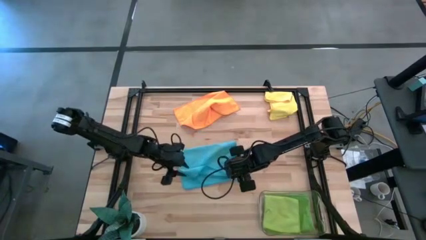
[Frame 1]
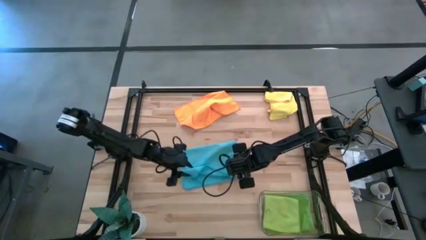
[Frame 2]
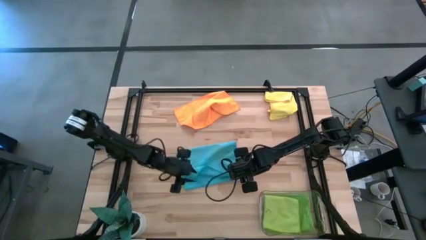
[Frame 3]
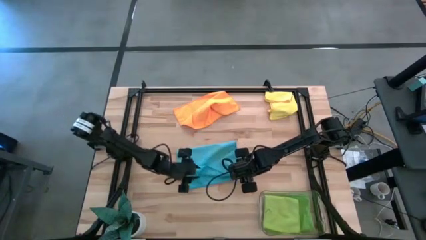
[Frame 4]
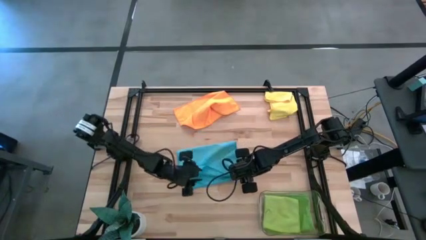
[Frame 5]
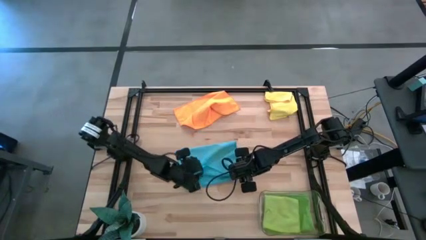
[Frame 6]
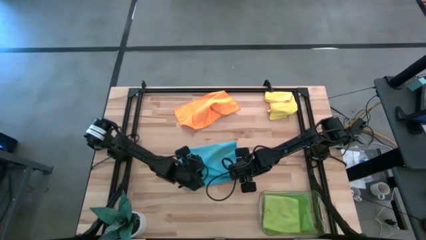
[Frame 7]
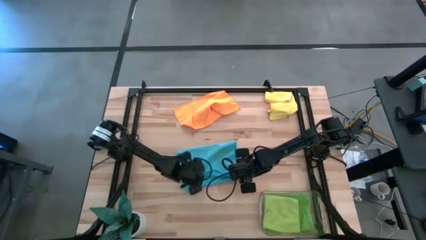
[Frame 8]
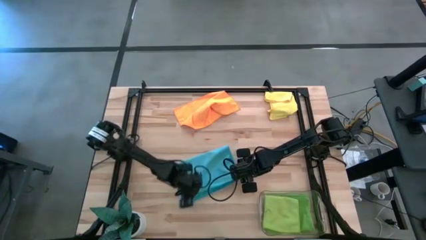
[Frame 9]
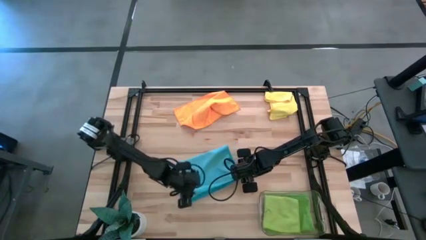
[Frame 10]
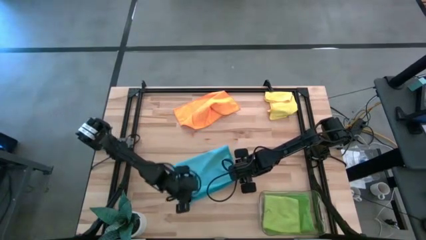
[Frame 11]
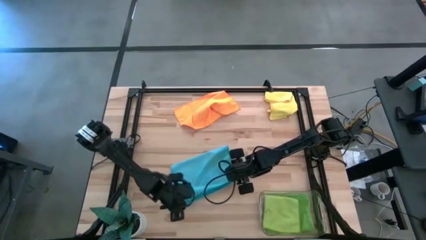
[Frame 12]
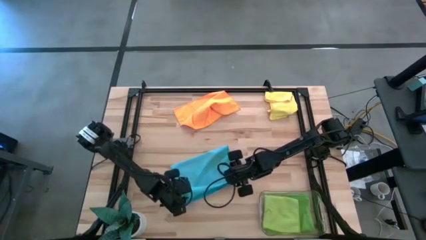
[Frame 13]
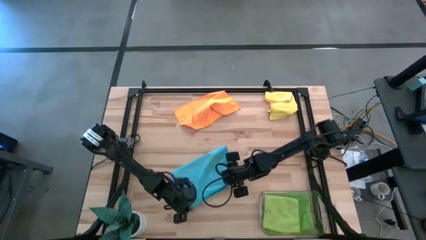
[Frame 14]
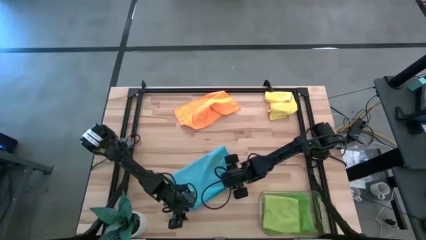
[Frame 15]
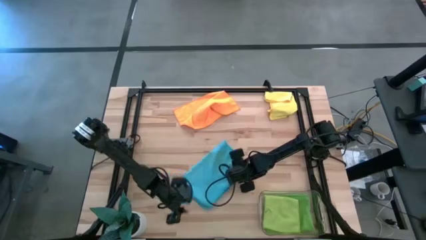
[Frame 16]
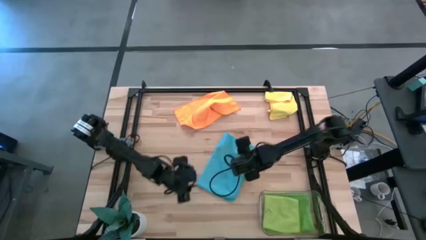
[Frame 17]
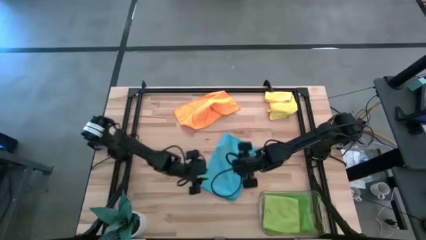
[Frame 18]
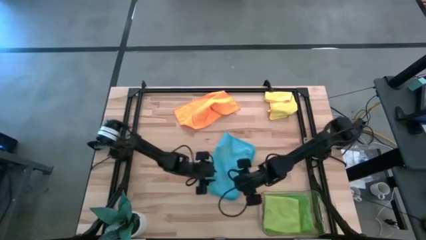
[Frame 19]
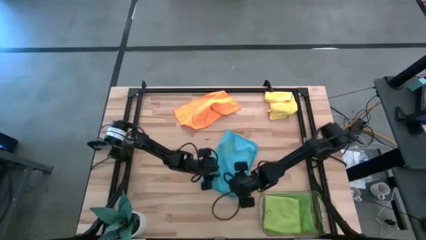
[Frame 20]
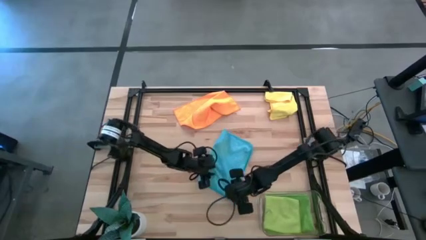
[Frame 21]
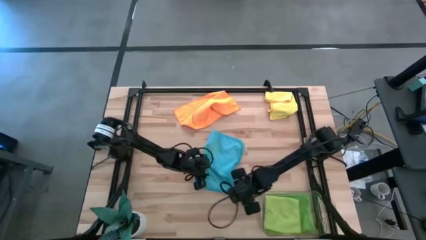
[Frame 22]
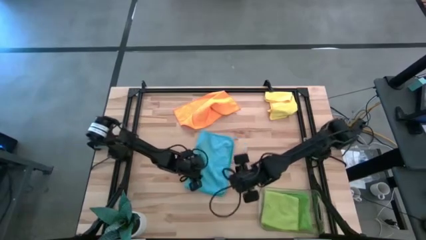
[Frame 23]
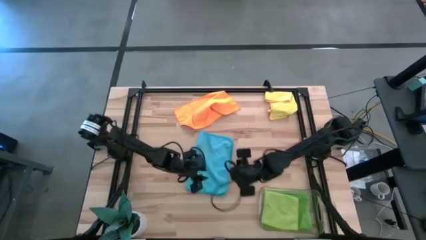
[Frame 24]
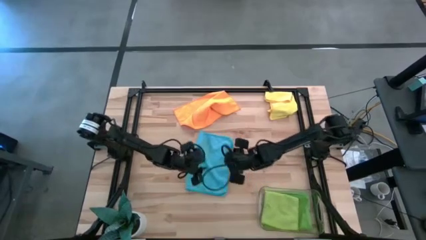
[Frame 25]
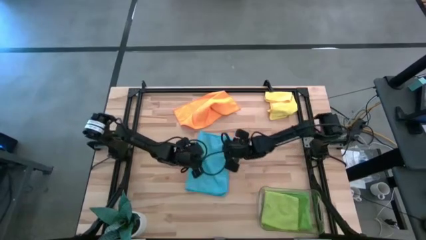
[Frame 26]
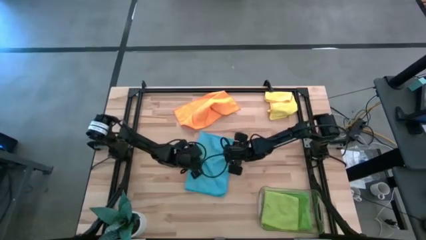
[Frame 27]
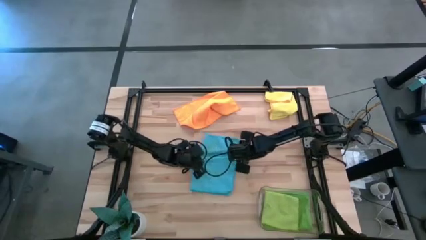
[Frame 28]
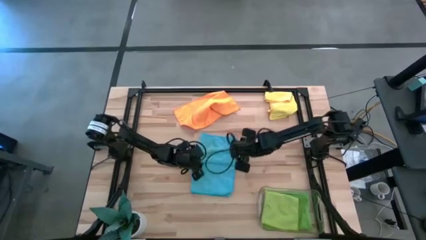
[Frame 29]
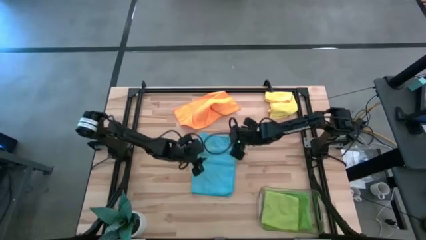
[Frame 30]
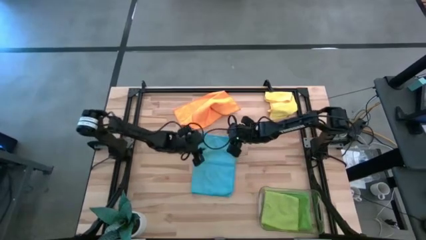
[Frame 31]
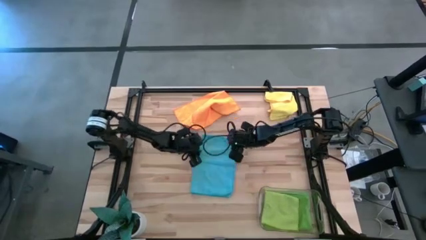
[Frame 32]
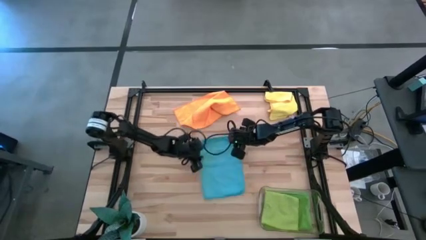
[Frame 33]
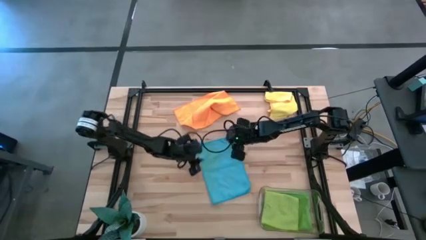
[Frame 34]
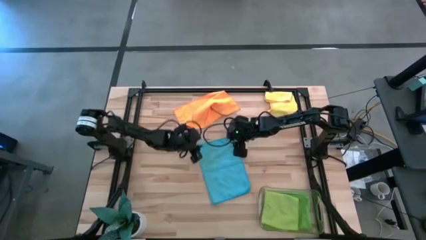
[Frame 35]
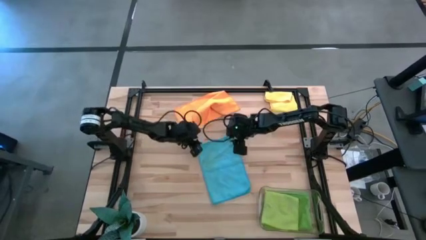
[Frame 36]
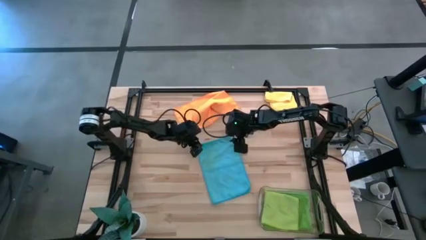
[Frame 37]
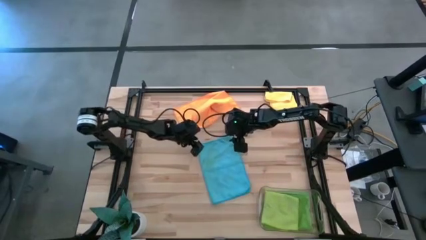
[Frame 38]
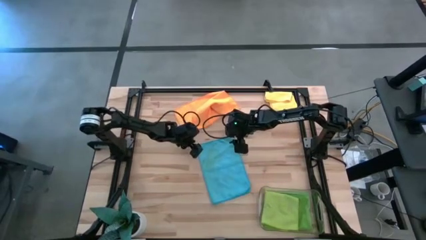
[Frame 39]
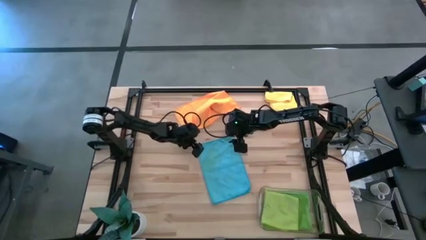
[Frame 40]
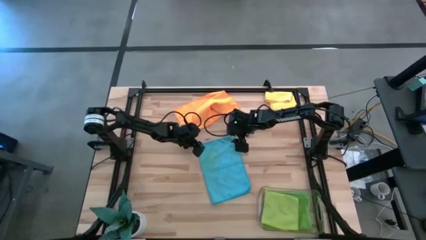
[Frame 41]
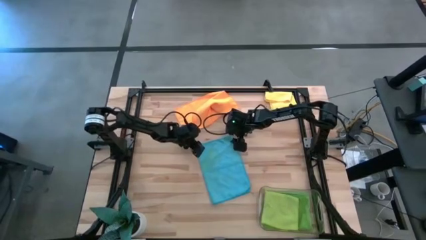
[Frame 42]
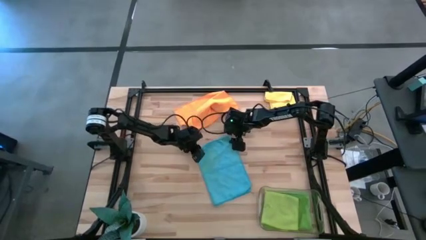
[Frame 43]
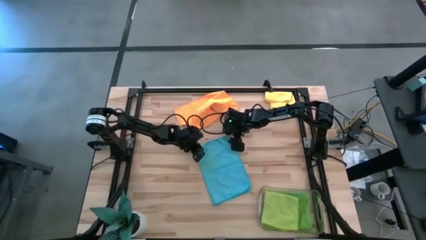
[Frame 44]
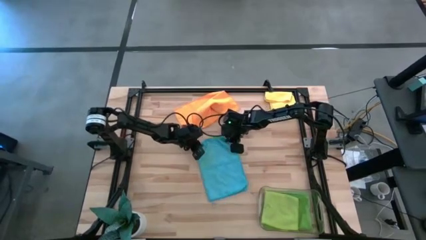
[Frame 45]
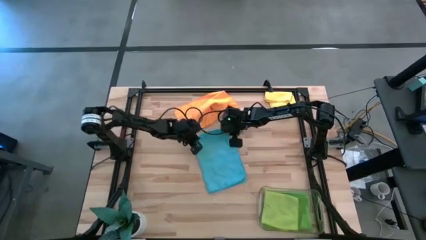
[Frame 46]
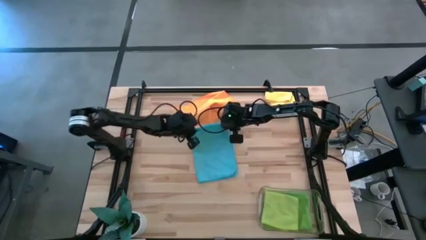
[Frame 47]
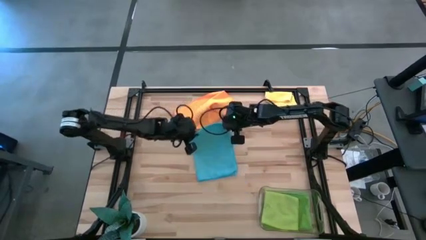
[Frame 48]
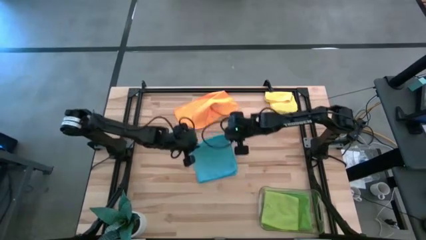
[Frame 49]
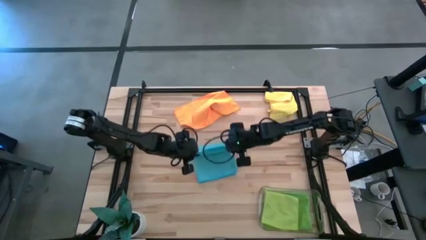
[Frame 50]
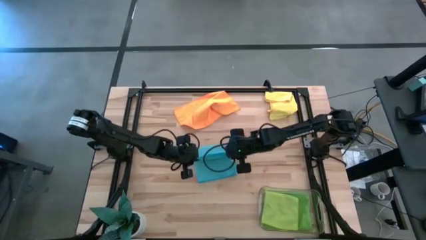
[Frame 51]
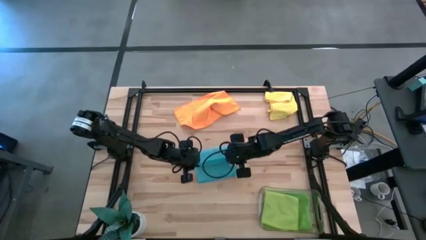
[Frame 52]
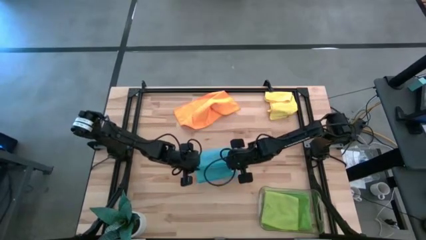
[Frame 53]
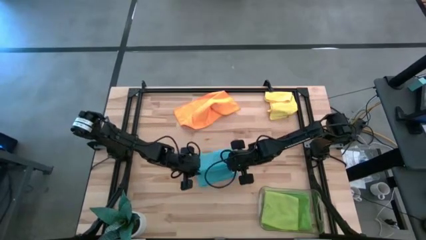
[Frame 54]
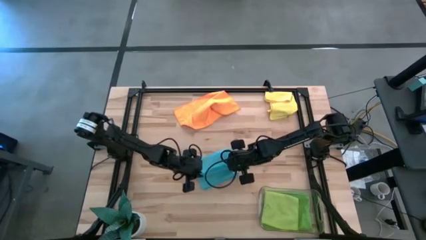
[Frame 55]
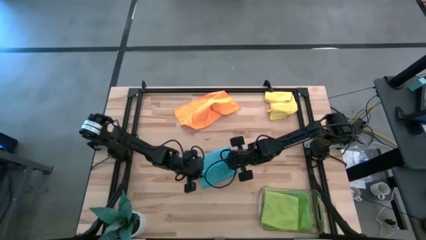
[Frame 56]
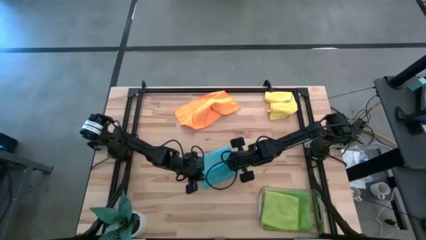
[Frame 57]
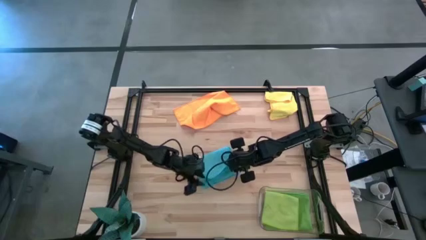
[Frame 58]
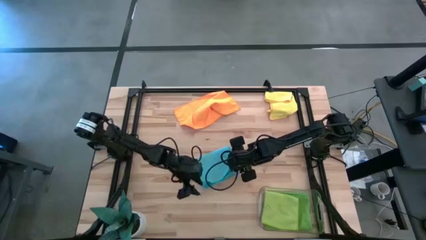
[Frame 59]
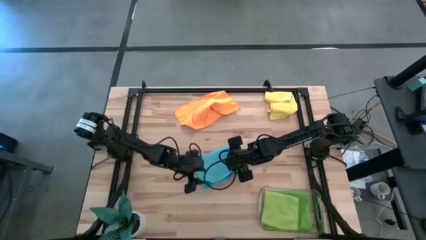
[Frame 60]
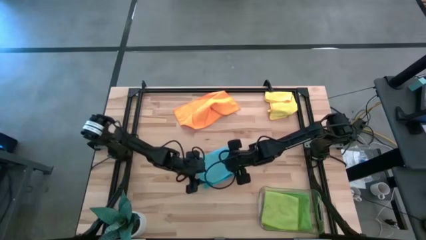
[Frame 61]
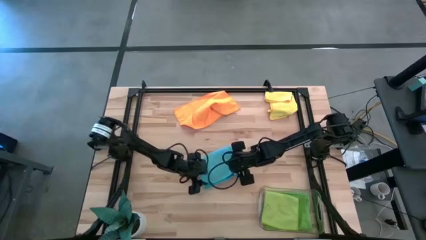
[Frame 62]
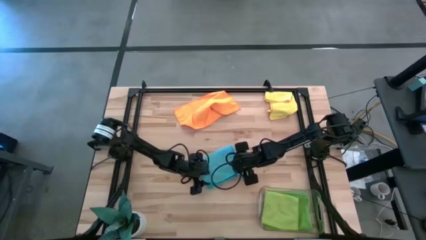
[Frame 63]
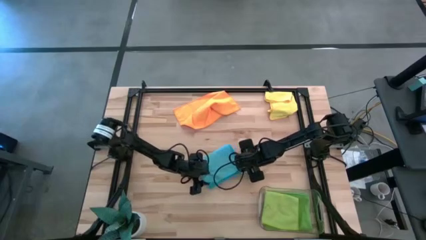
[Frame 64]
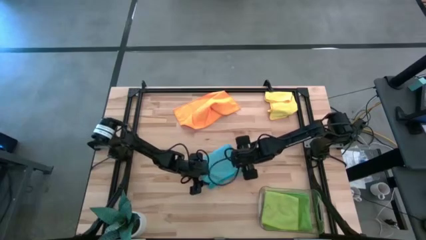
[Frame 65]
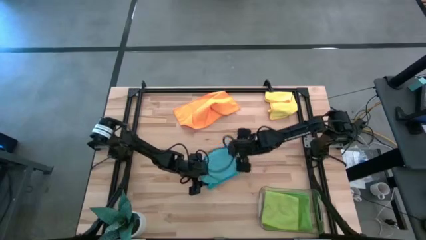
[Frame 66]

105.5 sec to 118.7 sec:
Task: Fold microfiber towels
Fold the blue microfiber towel

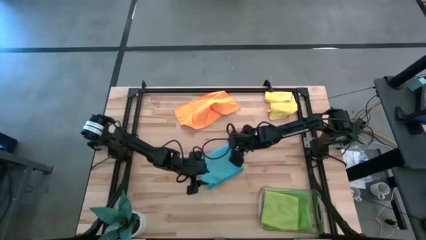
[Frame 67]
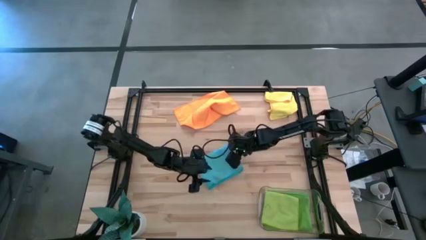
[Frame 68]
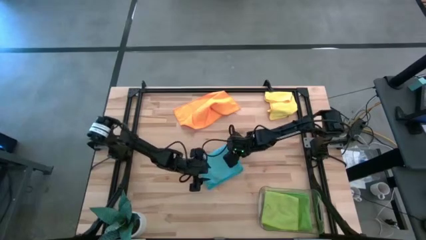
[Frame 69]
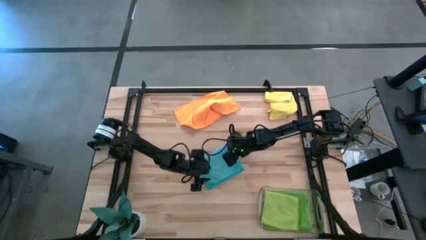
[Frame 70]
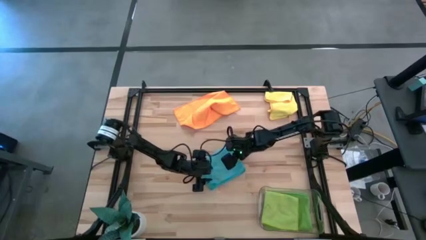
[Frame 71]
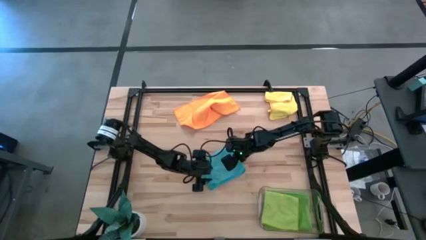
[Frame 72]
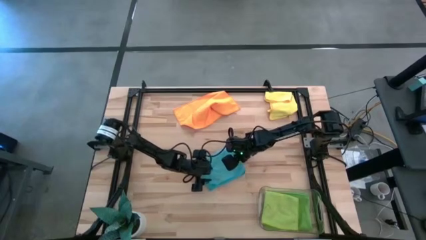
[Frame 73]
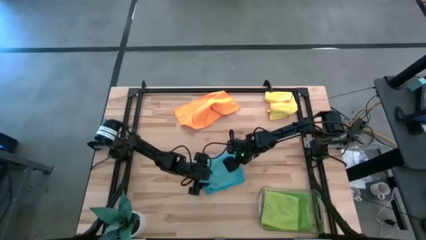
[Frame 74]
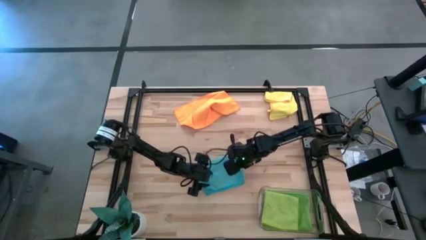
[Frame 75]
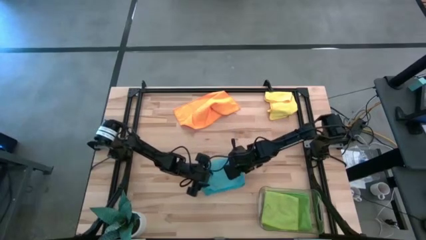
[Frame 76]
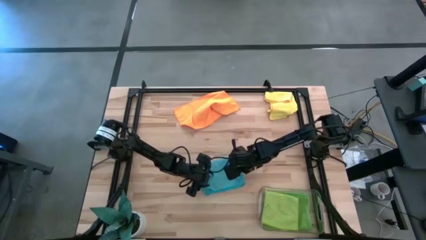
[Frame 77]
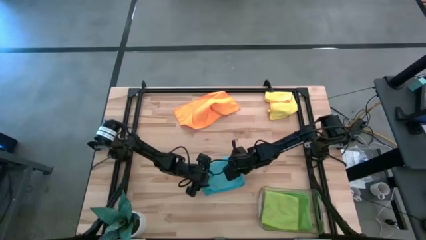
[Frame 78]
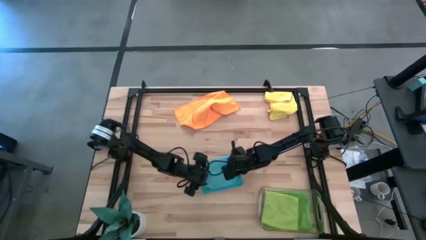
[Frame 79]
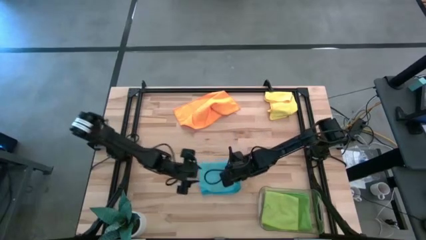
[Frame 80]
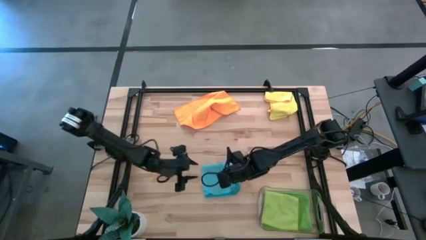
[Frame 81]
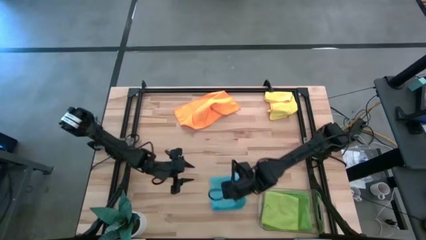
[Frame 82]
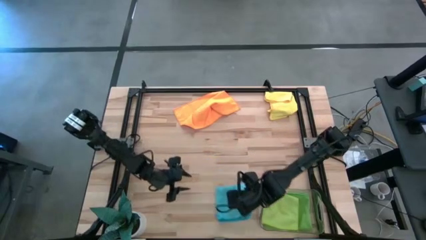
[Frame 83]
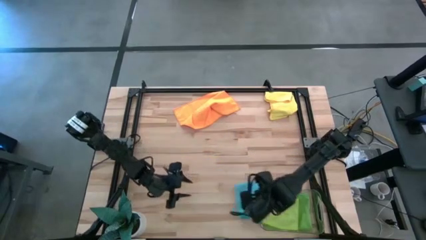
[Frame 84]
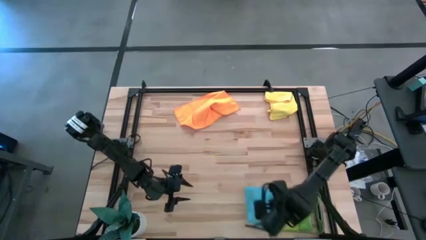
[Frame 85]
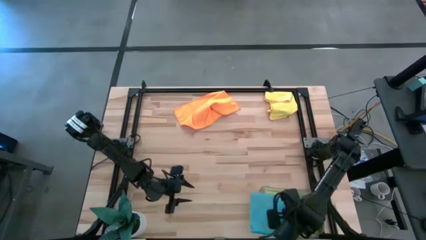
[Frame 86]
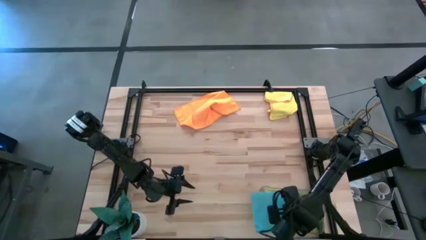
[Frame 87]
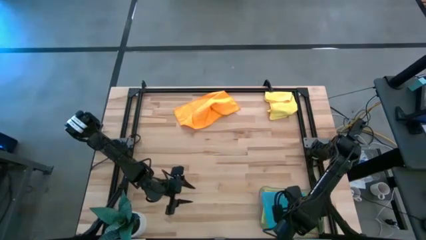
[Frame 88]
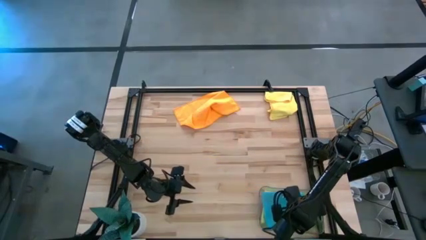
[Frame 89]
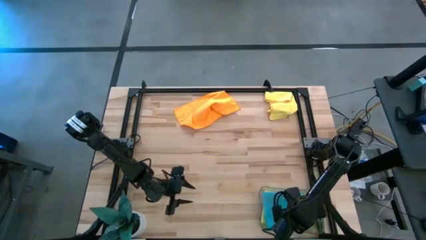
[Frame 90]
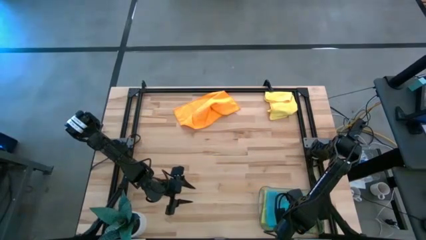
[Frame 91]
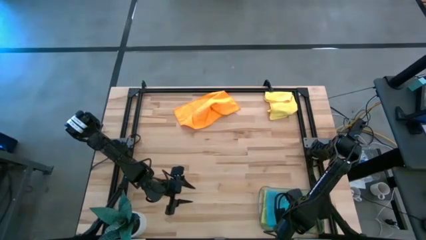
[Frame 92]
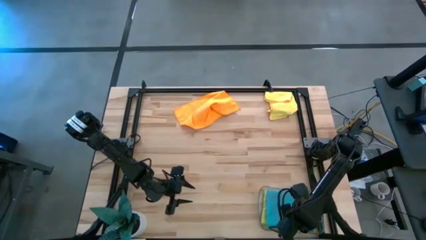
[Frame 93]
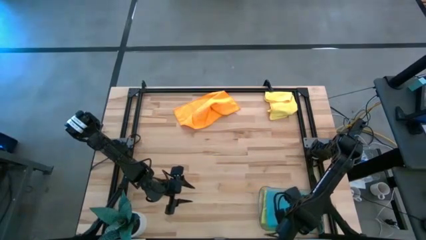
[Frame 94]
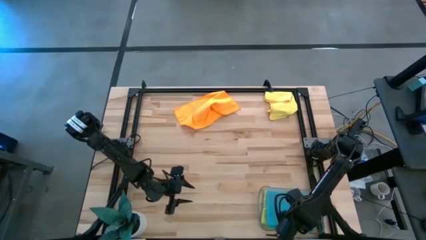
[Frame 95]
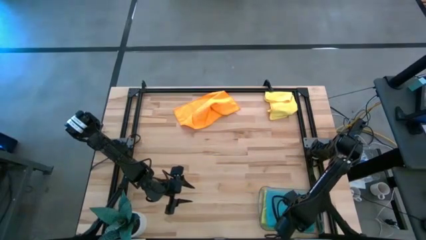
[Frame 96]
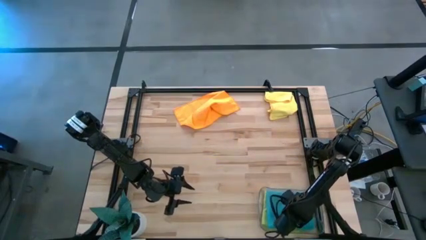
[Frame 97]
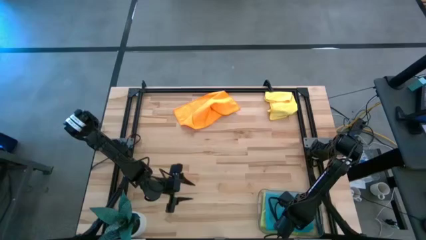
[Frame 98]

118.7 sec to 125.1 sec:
Put the blue microfiber towel into the transparent bin
